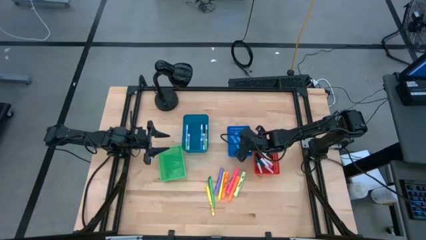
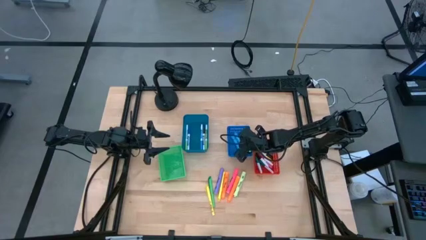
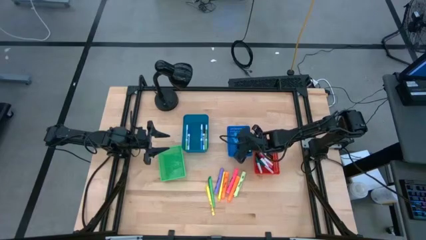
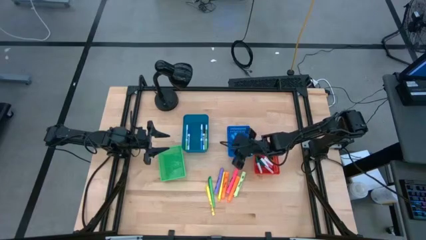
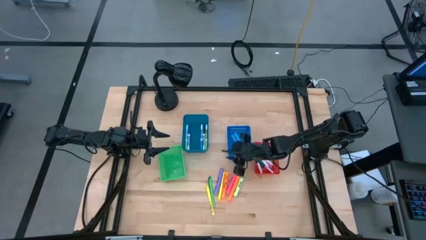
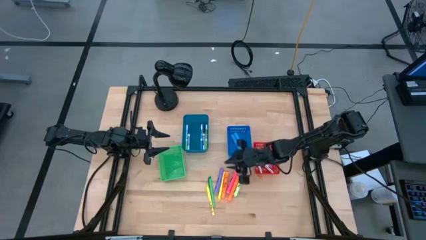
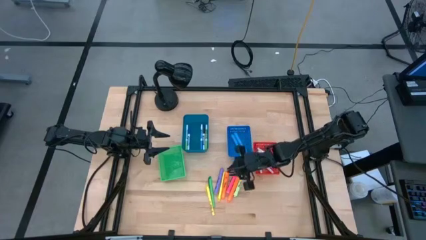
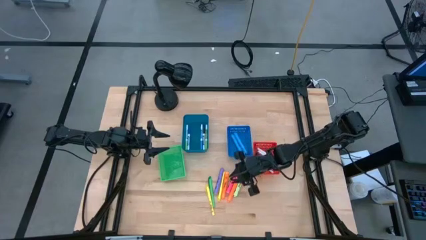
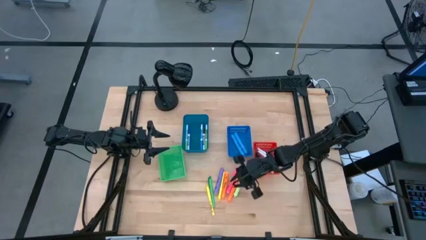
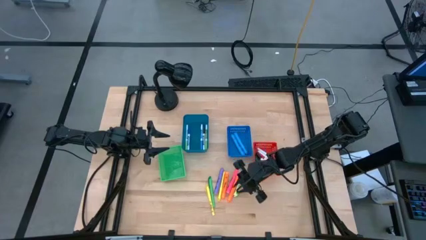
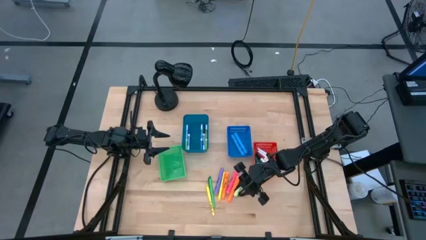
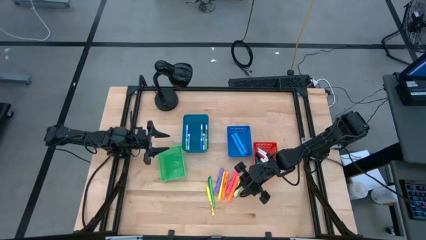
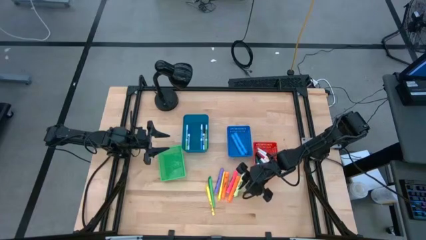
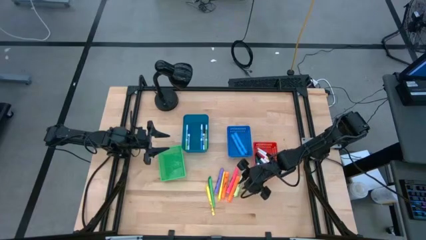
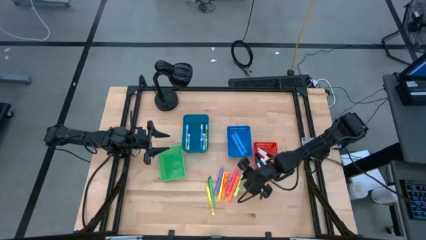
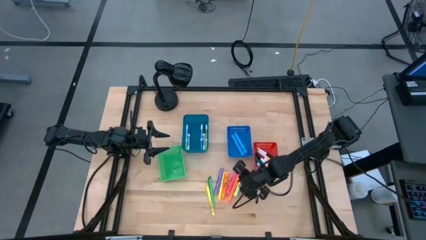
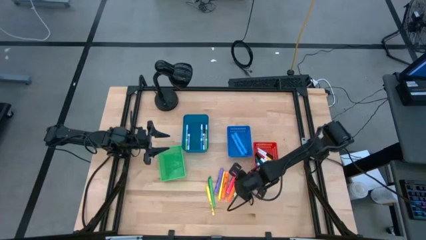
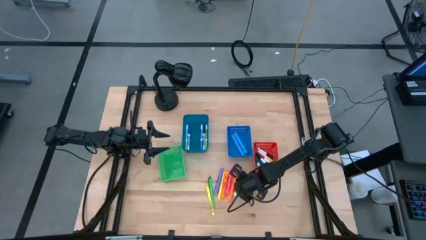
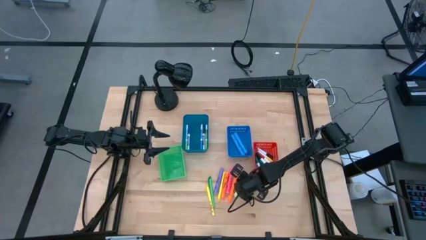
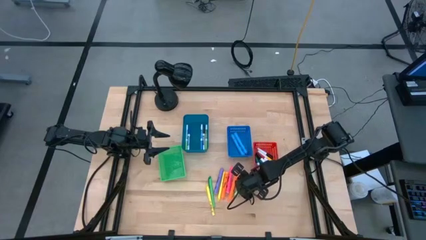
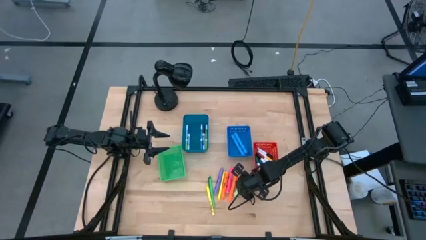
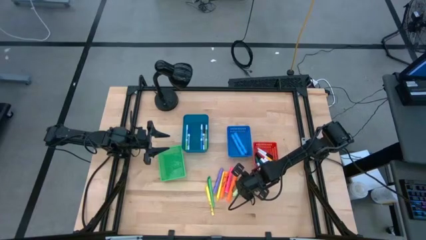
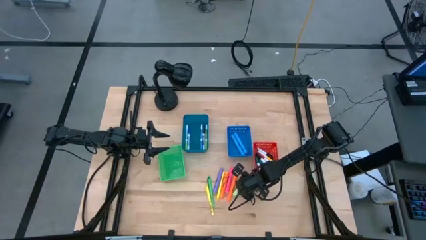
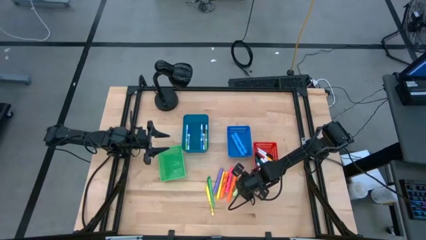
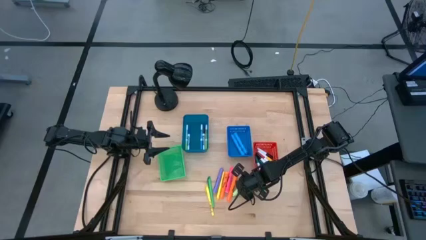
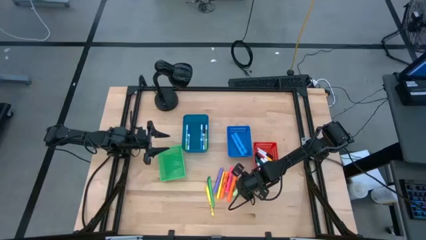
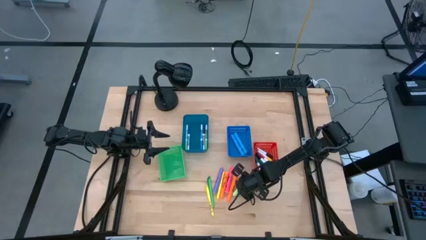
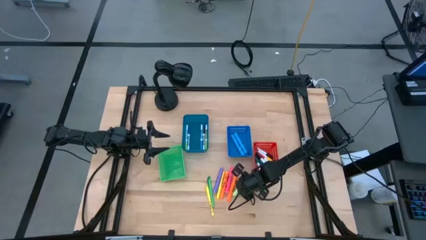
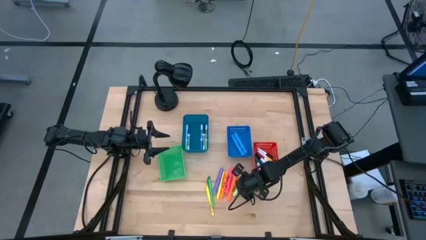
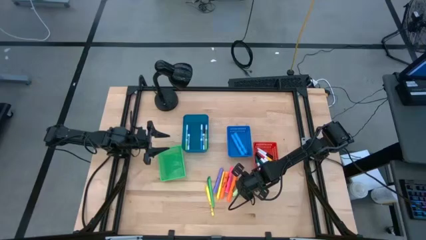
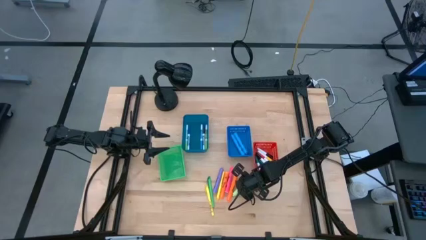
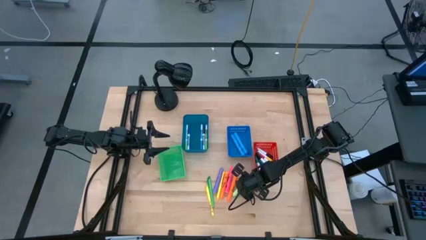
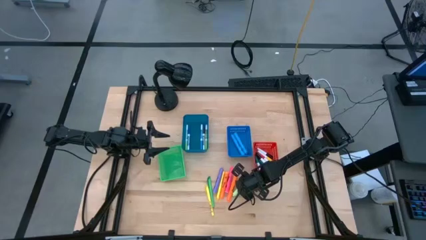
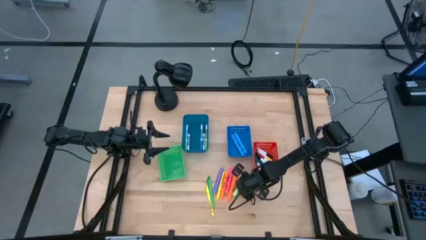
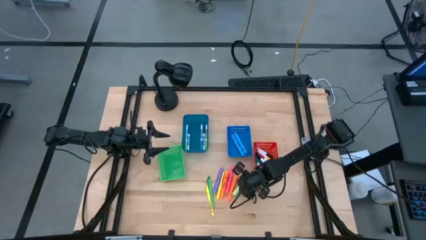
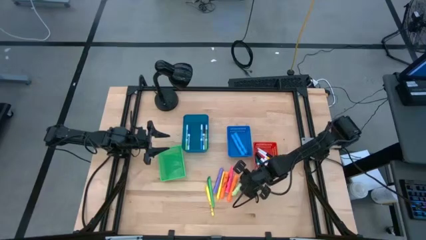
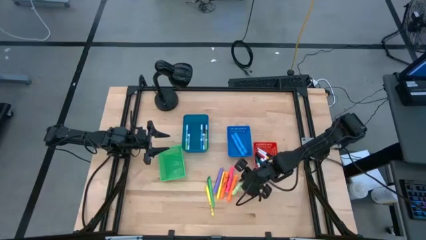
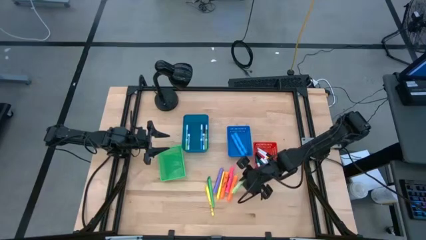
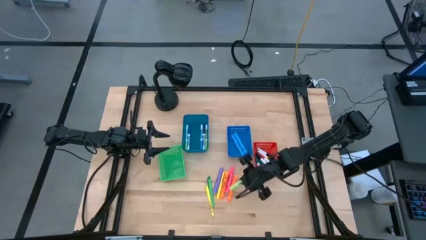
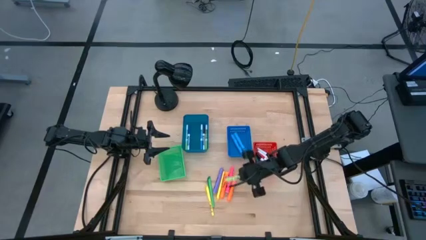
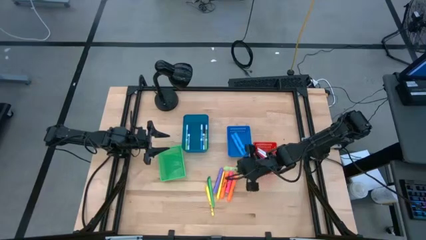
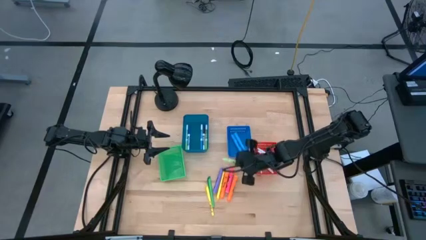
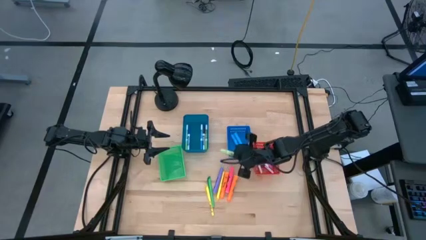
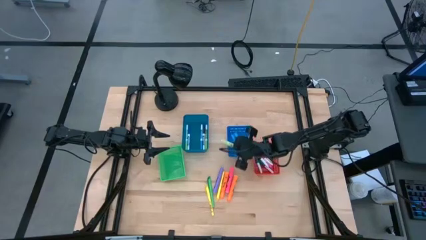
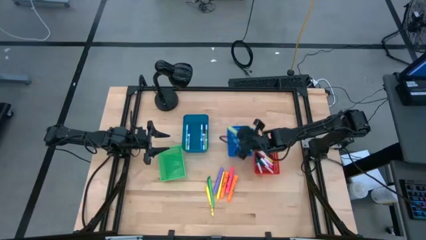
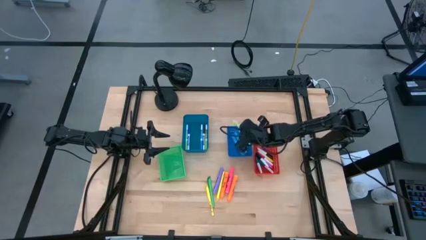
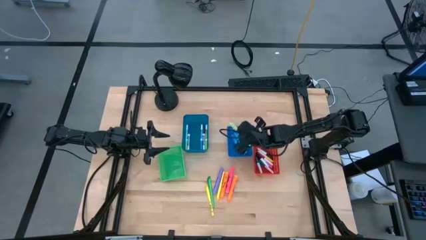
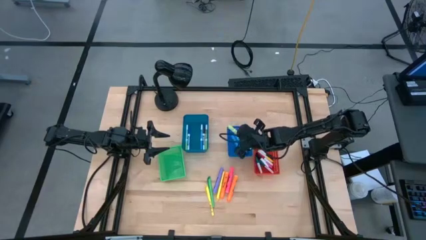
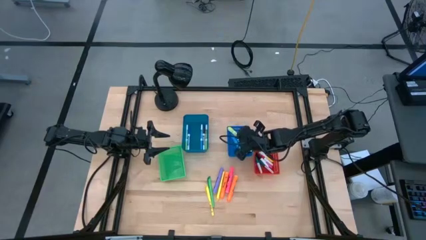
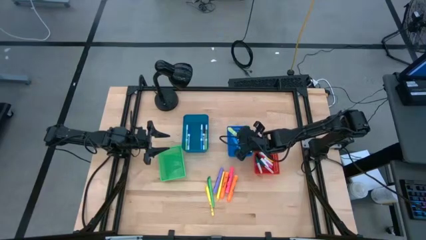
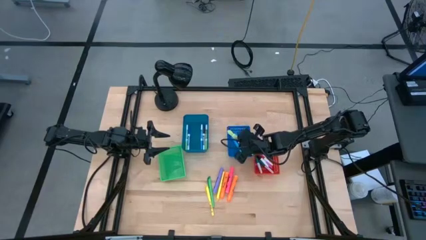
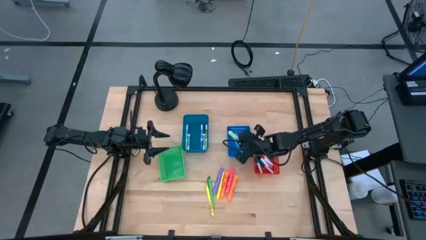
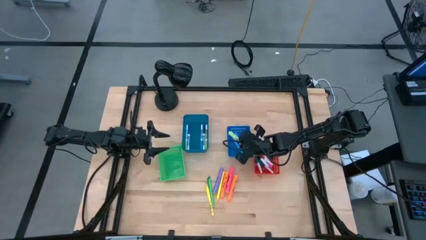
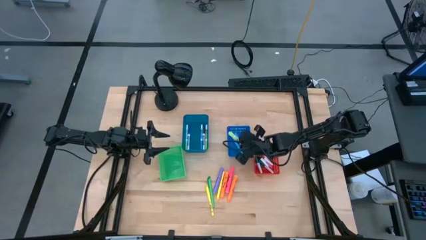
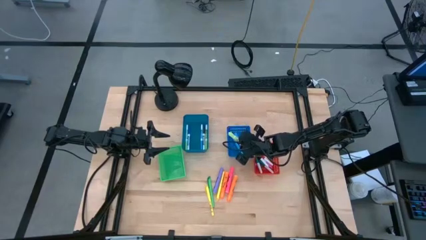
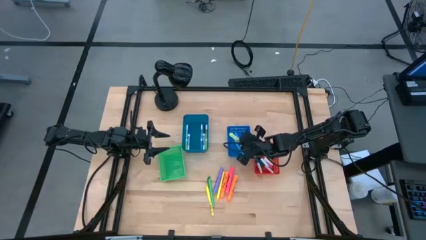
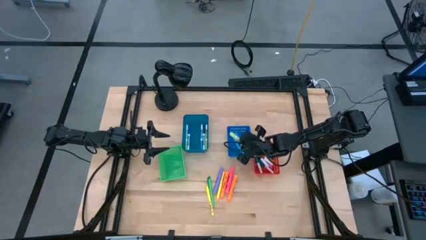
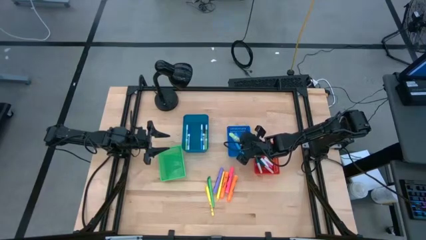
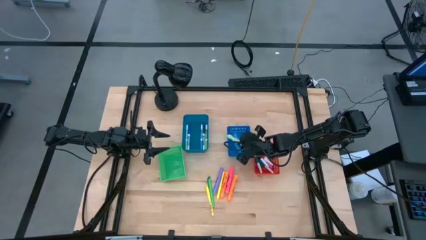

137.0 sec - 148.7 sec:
Task: Pick & Place Markers
Put the green highlighter pen into the blue bin

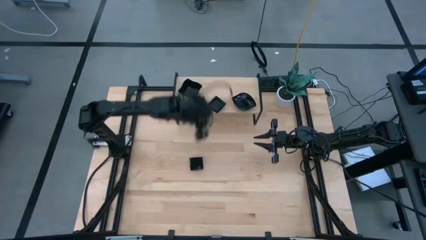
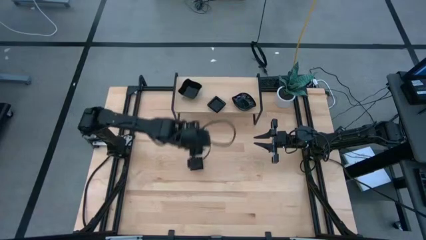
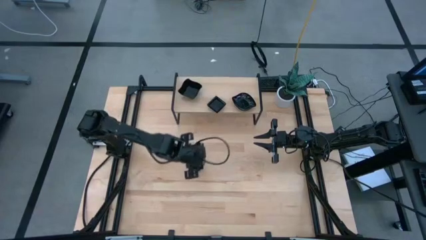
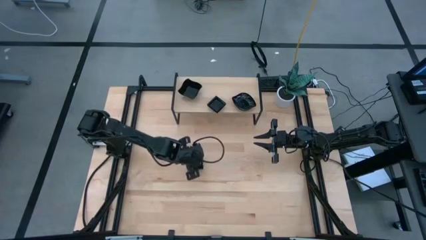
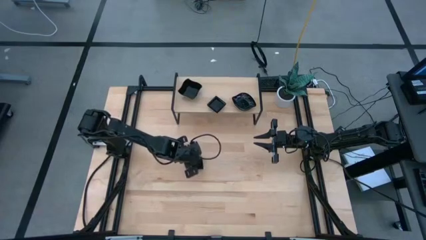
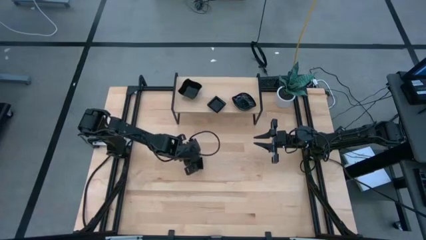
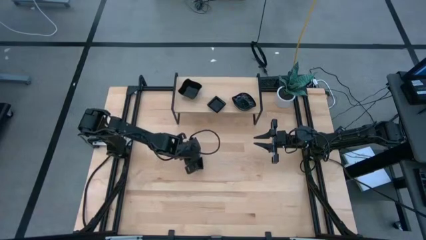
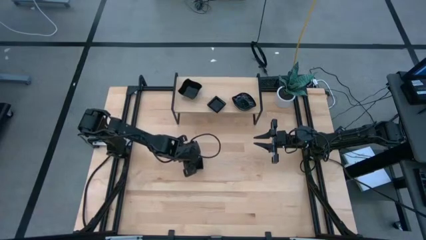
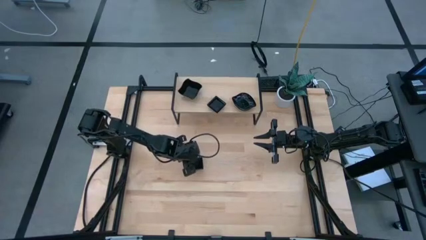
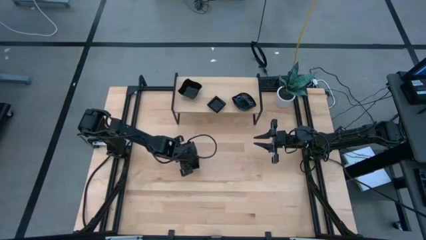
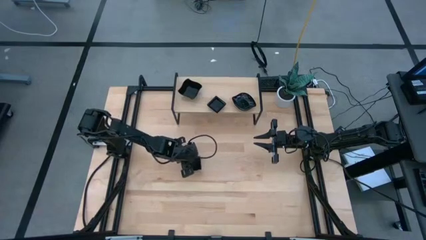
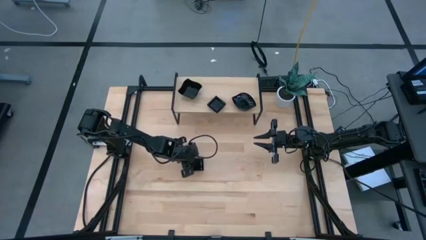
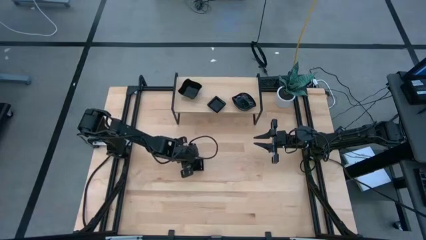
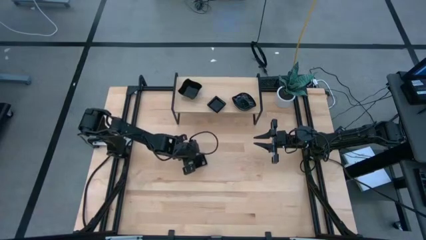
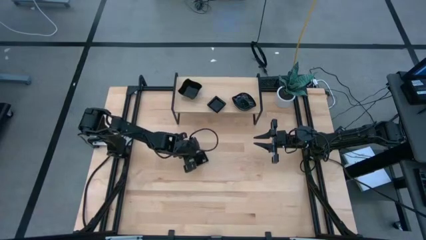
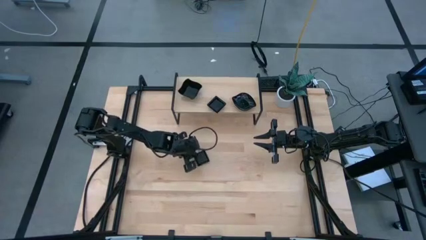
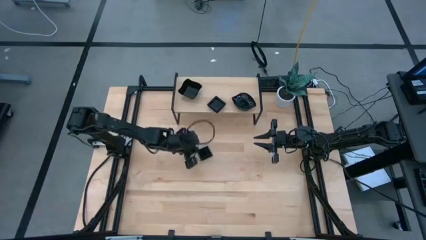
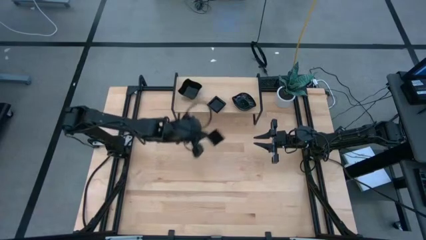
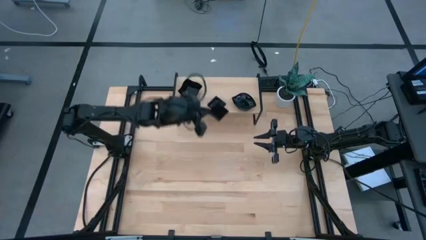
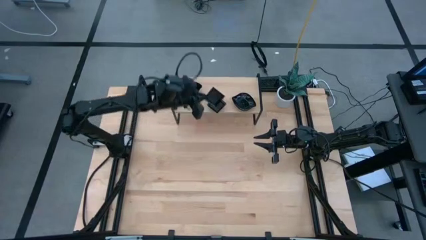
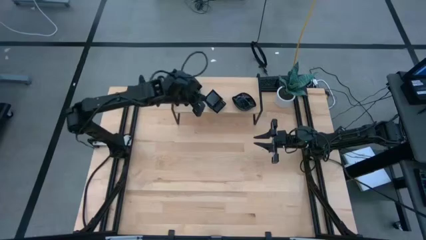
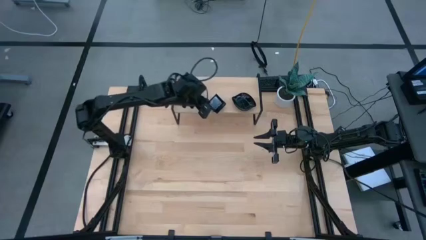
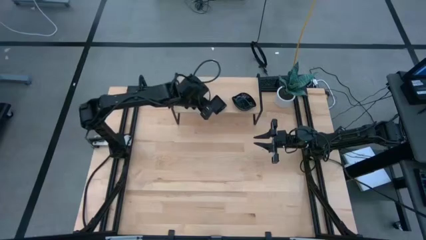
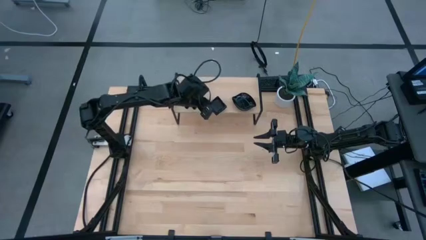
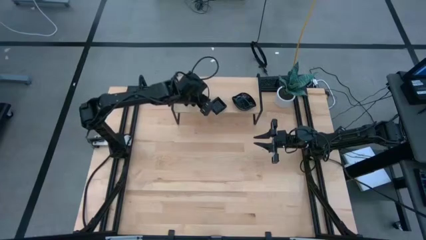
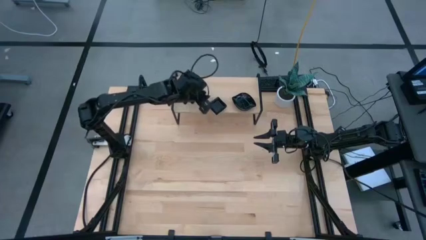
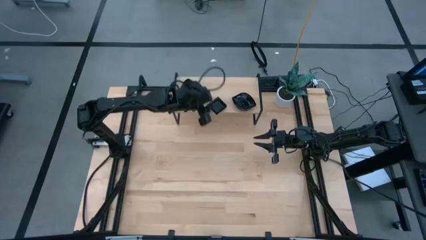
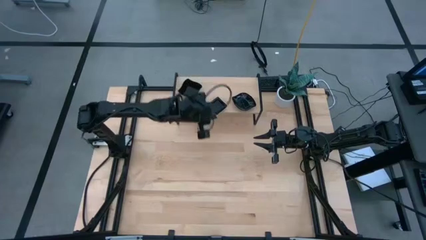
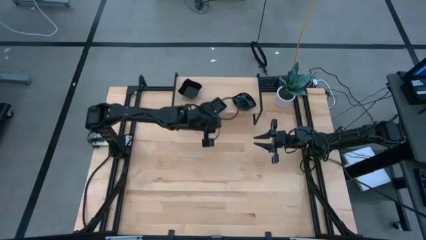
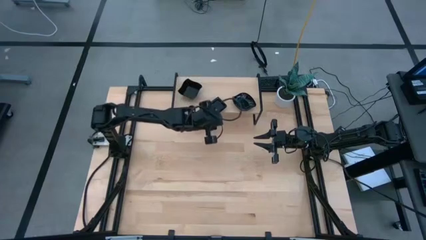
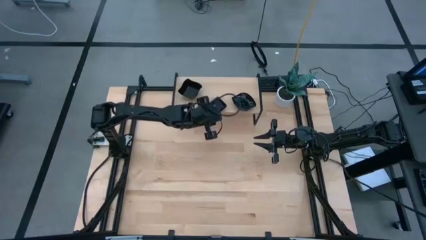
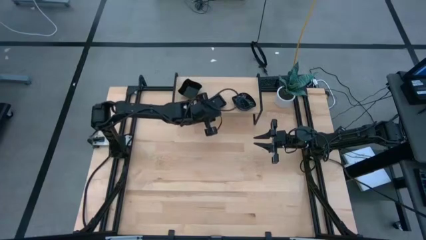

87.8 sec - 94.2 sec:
Task: Pick & Place Mini shaped plates
Stack the square plate on top of the other square plates on the shelf
